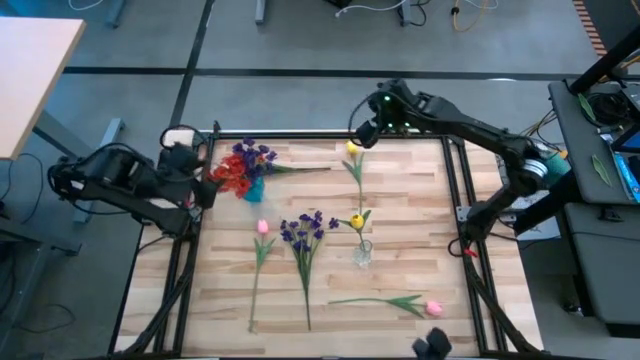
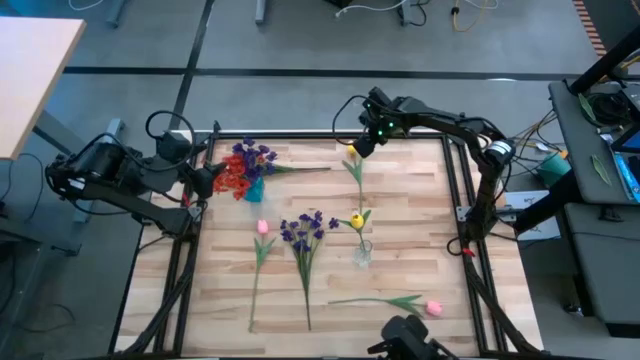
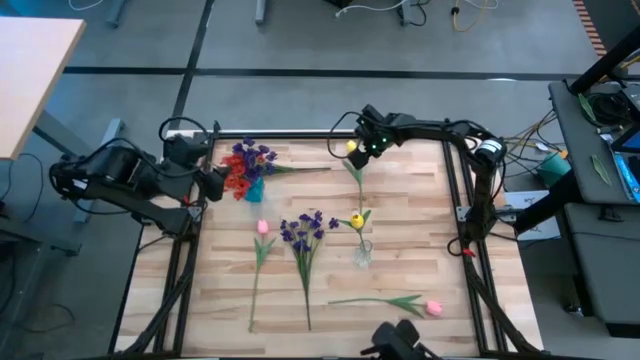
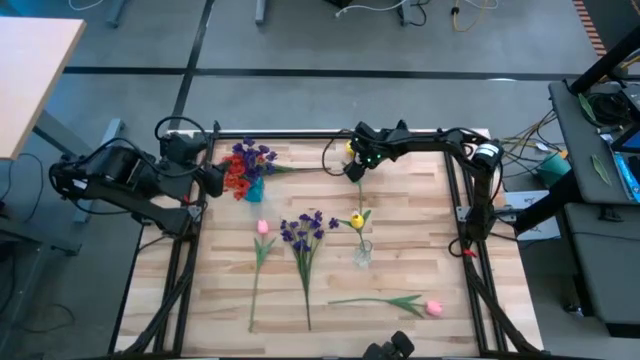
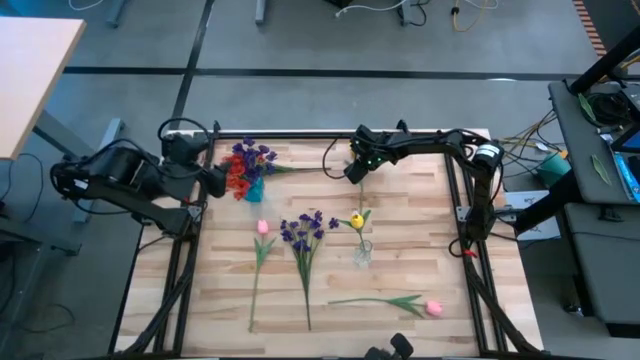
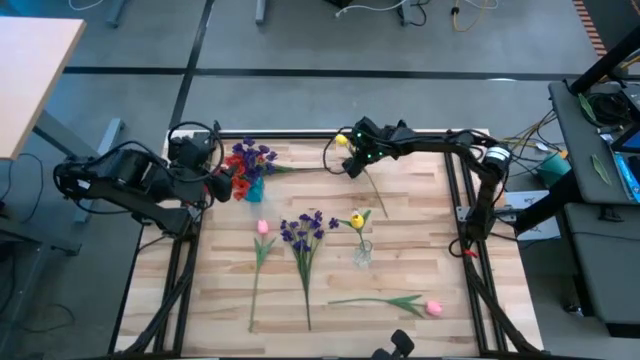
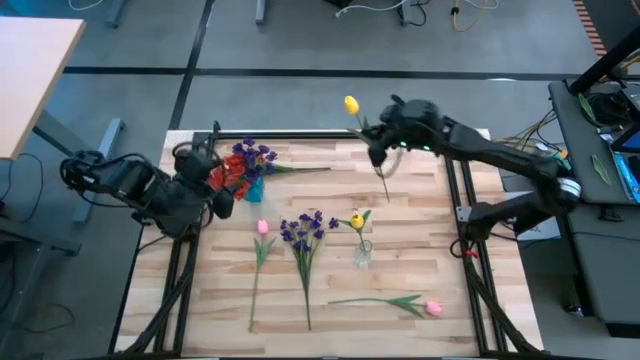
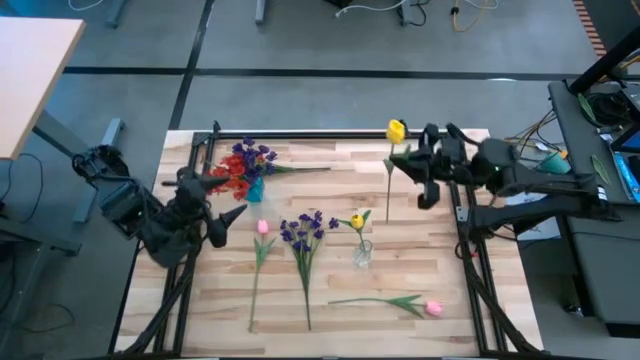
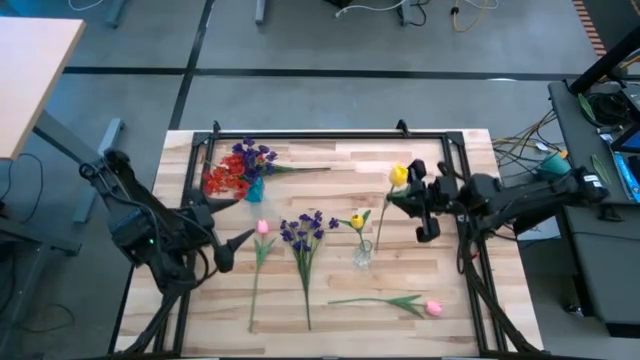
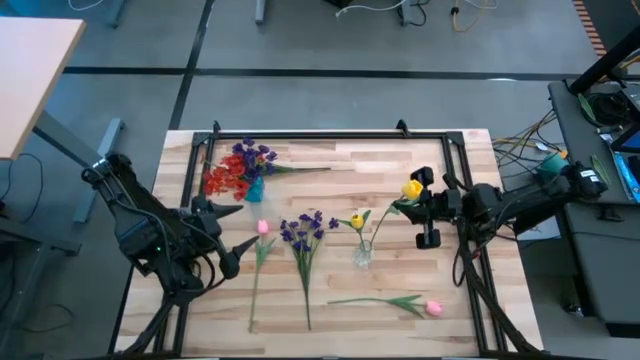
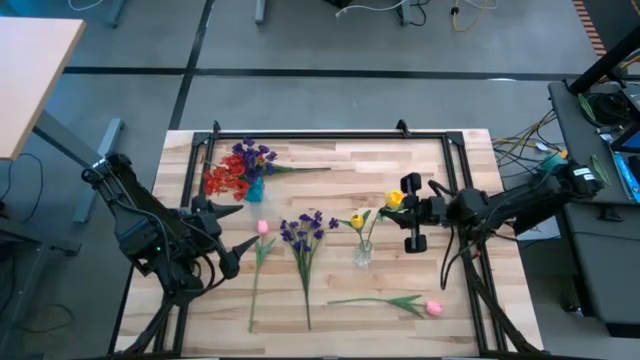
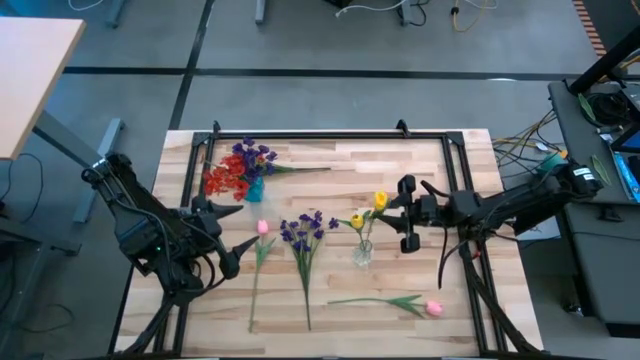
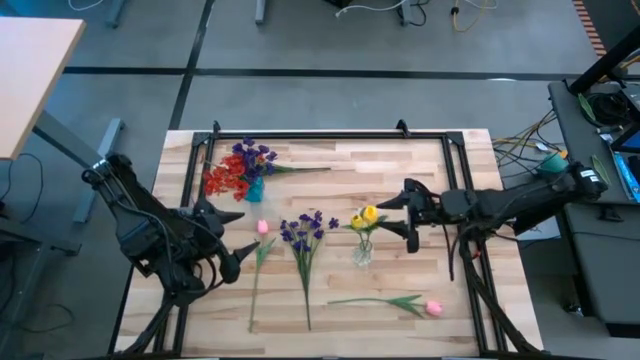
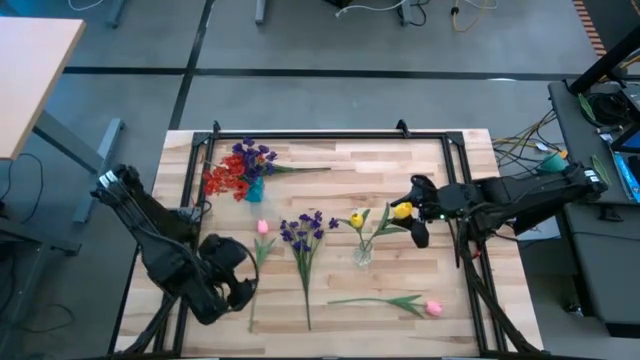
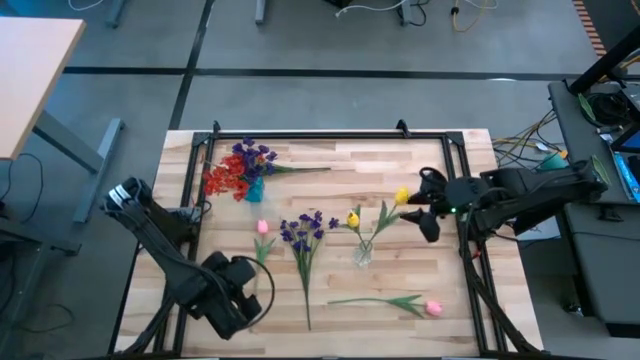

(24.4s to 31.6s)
Task: Sort flowers into vase by color
Put the yellow tulip into the transparent vase

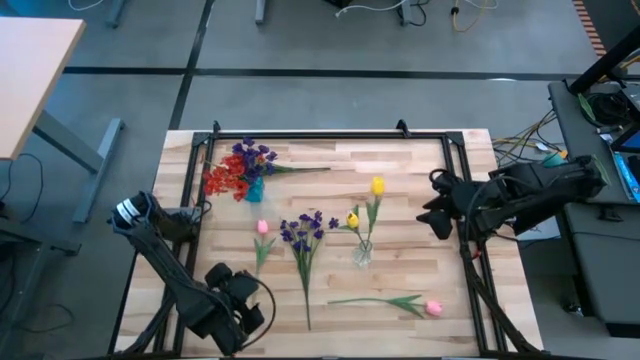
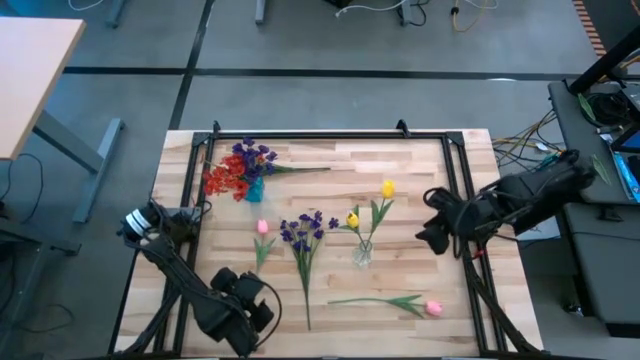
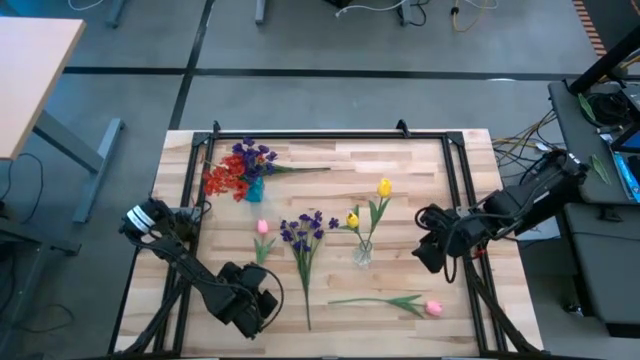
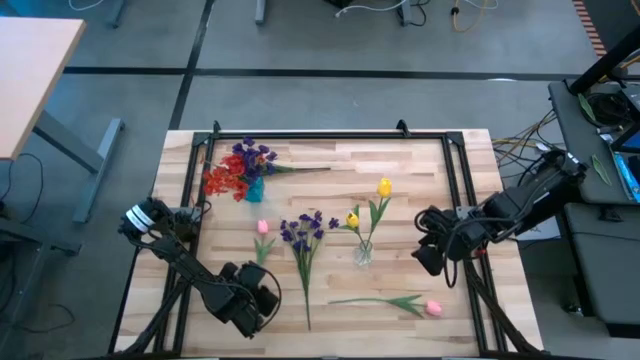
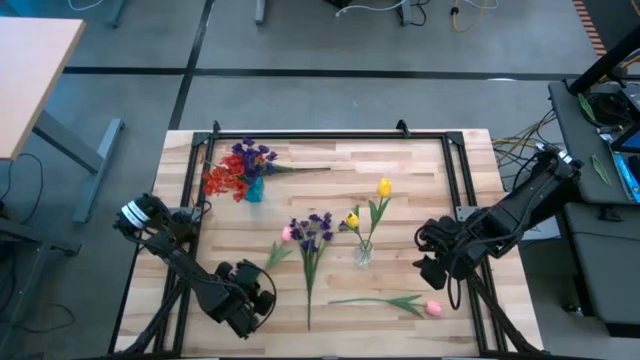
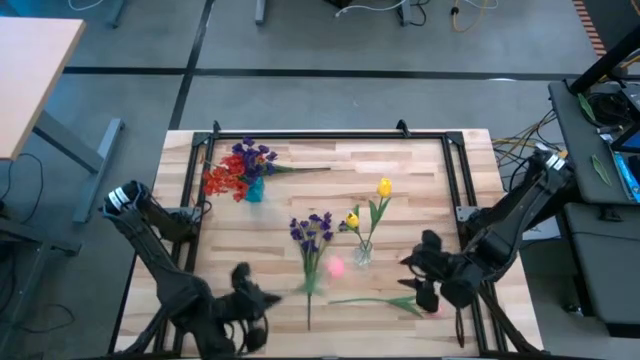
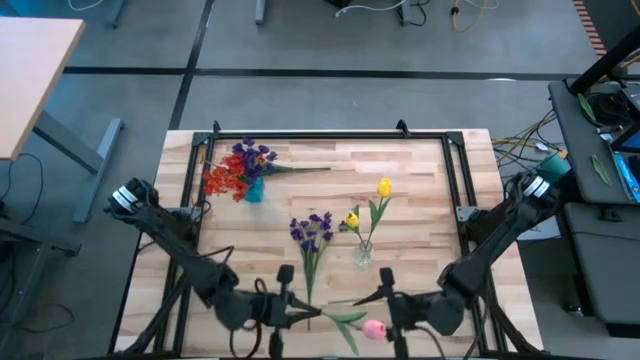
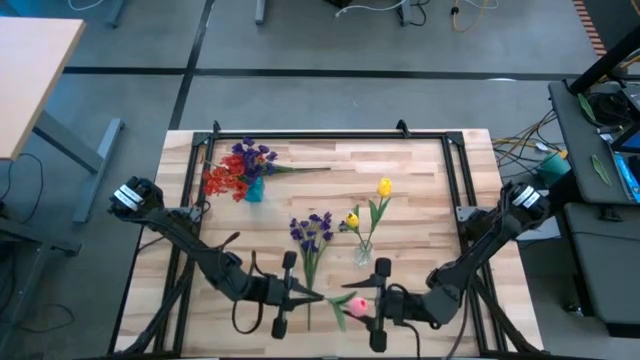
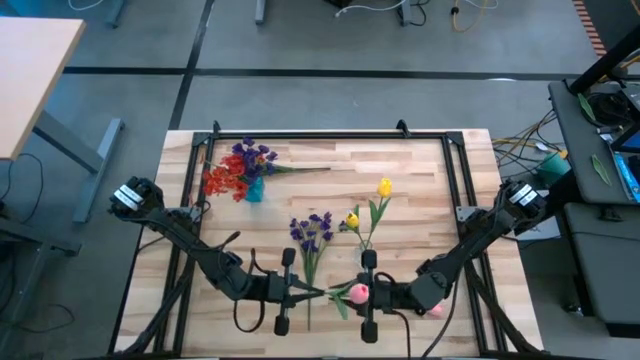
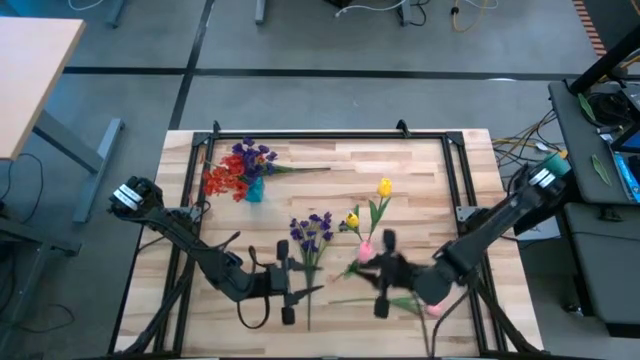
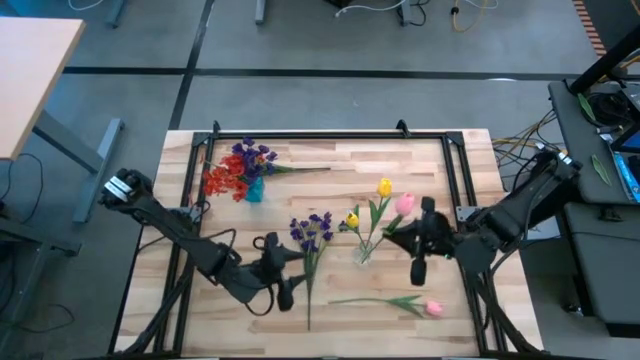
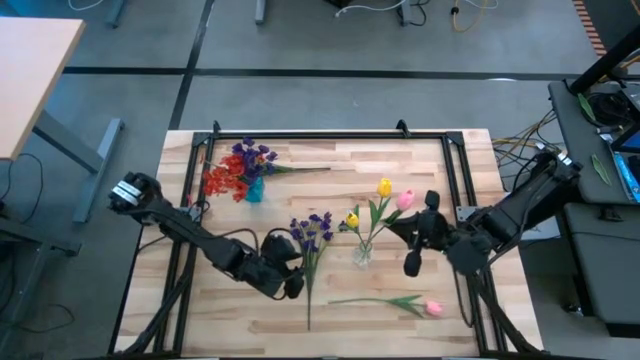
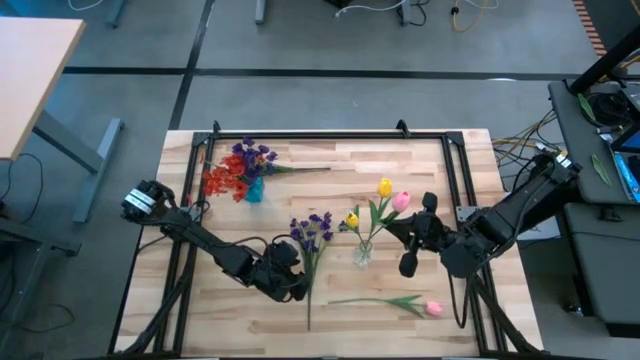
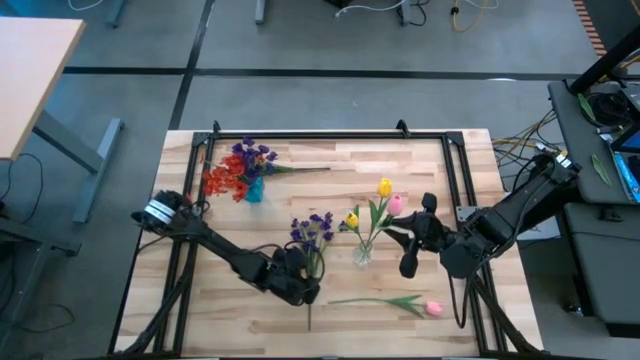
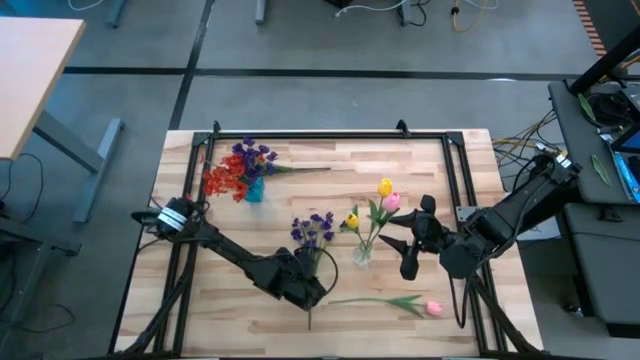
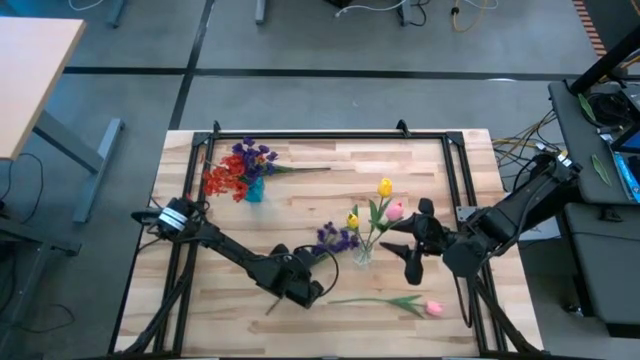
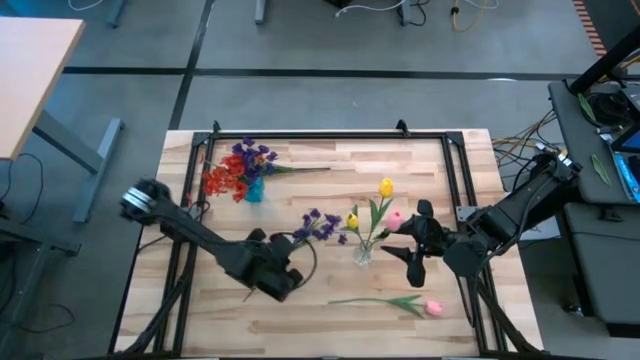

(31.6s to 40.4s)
Put the left pink tulip into the transparent vase

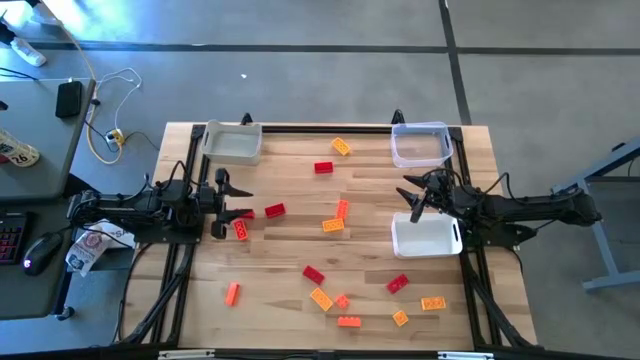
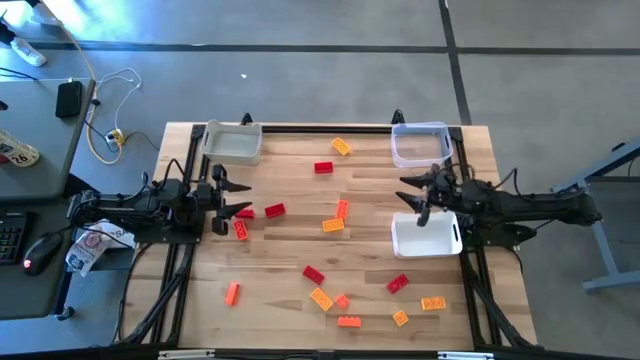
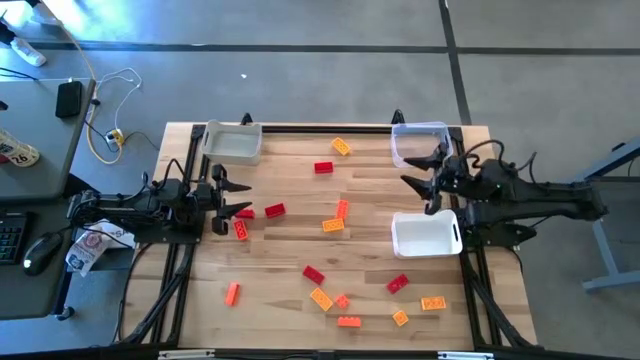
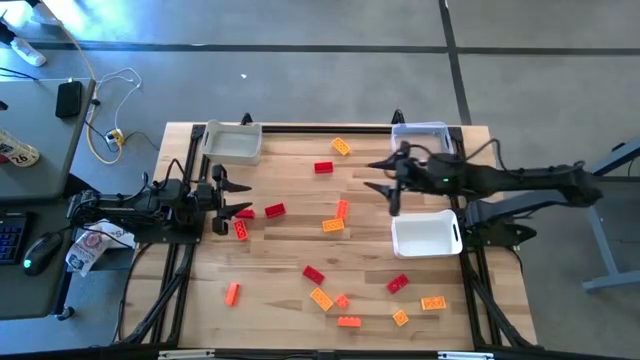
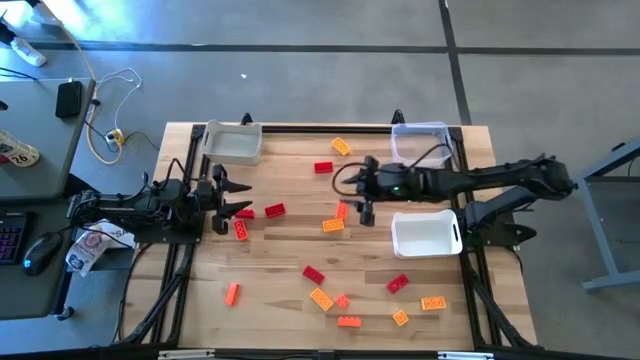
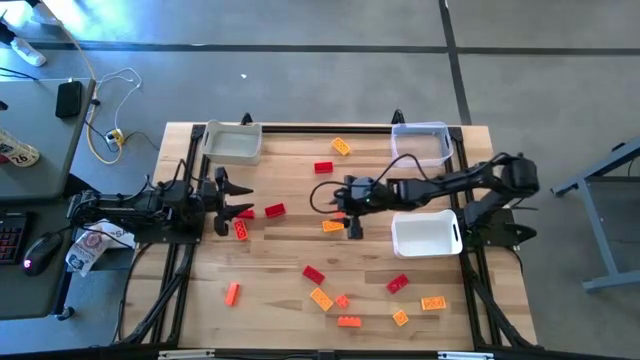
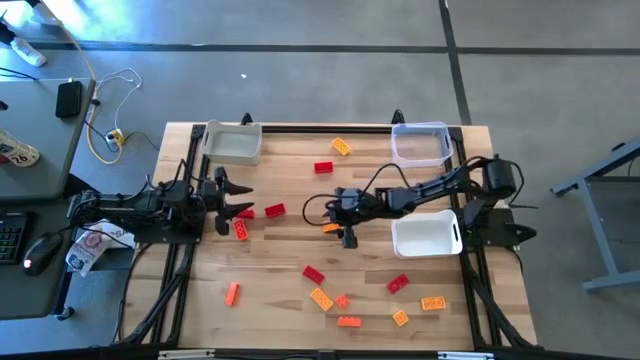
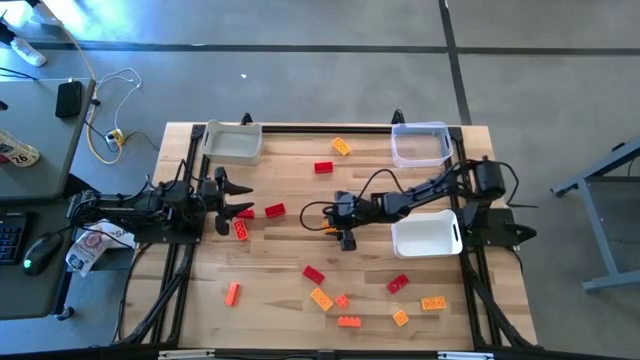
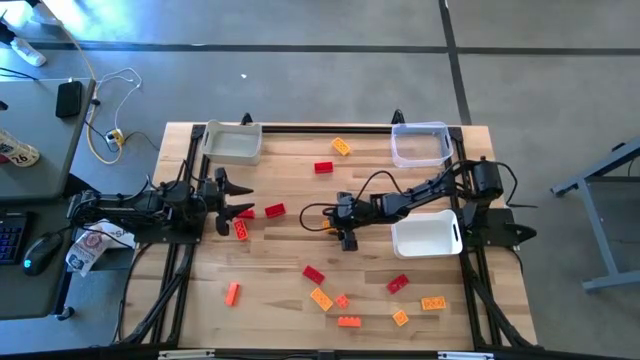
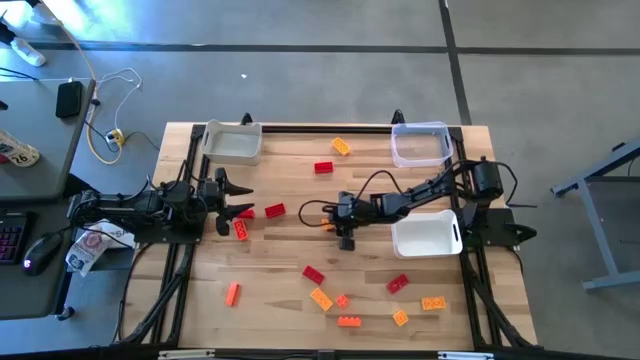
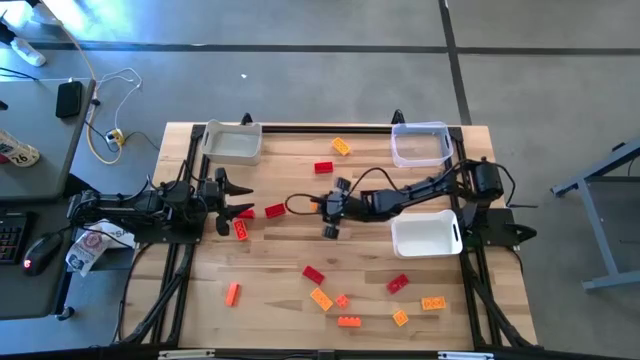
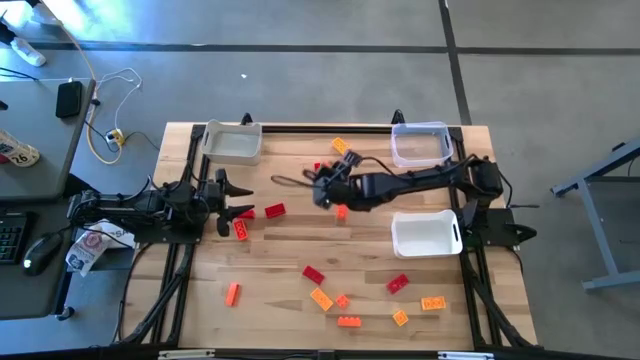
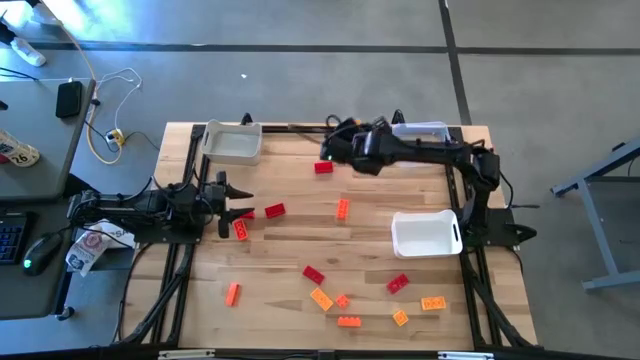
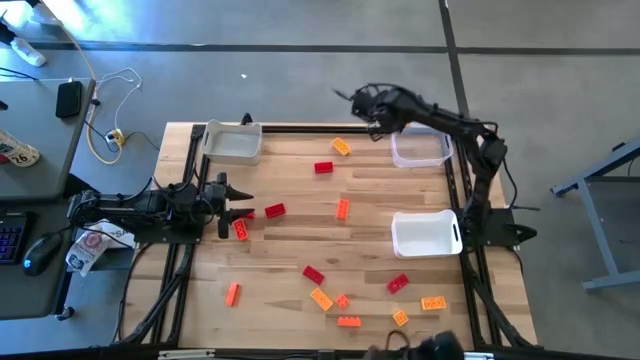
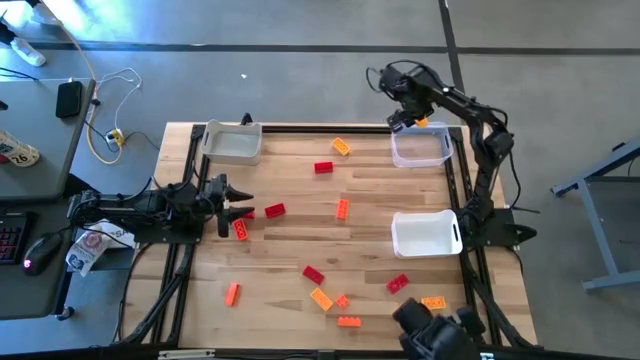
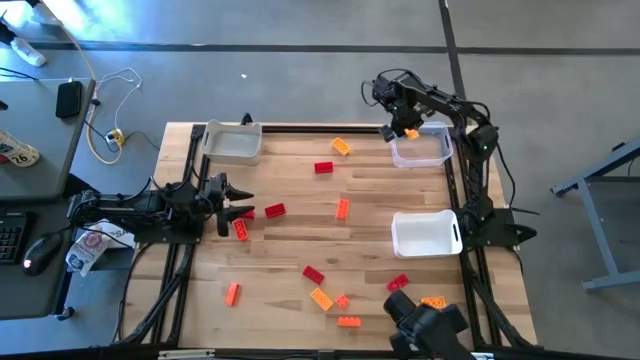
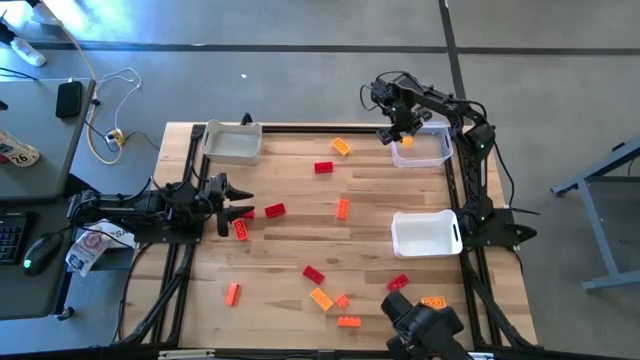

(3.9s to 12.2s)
Task: Sort & place blocks by color
Put the yellow game piece into the transparent bin
